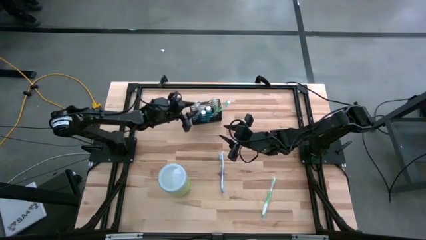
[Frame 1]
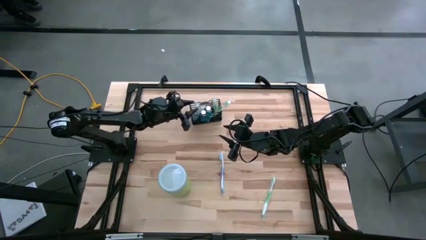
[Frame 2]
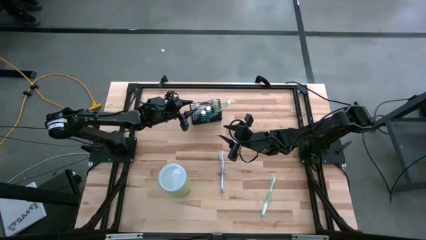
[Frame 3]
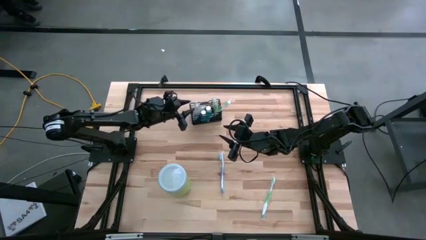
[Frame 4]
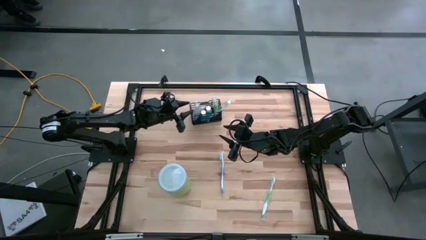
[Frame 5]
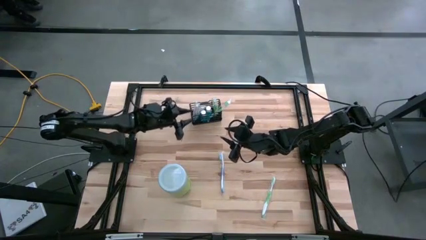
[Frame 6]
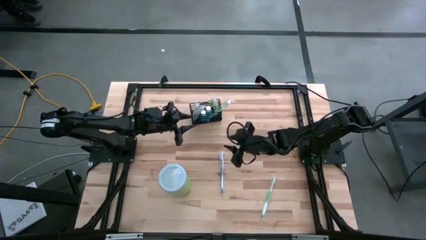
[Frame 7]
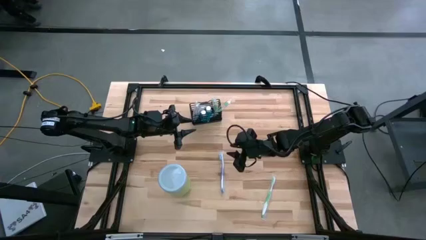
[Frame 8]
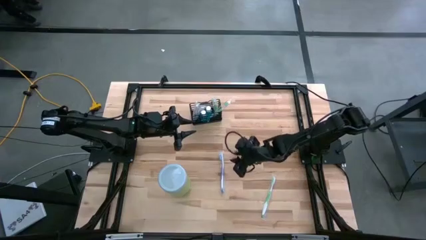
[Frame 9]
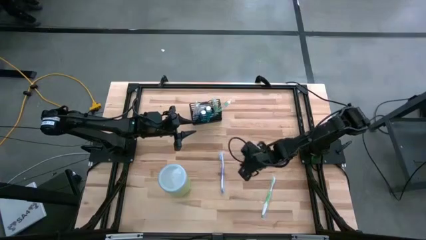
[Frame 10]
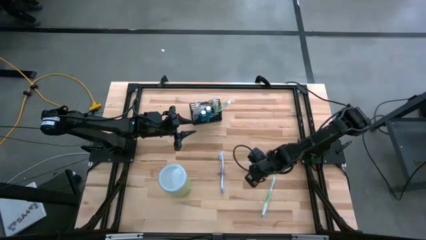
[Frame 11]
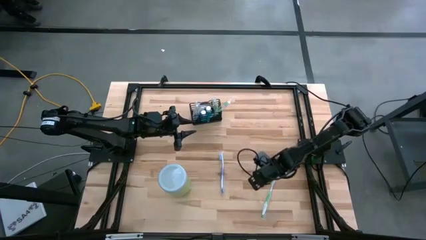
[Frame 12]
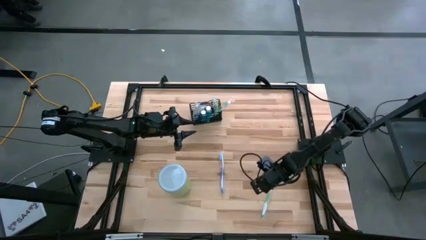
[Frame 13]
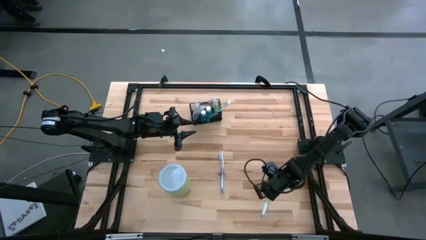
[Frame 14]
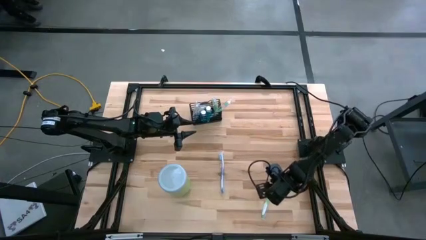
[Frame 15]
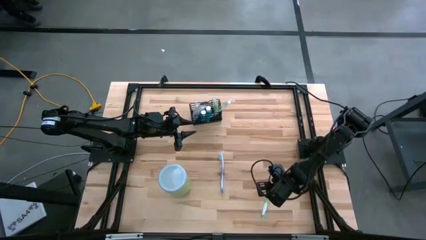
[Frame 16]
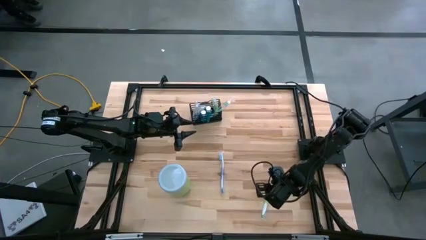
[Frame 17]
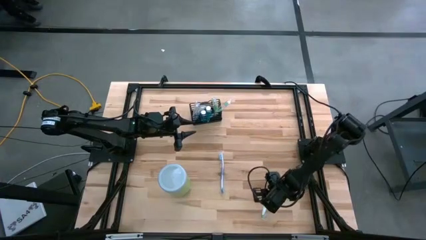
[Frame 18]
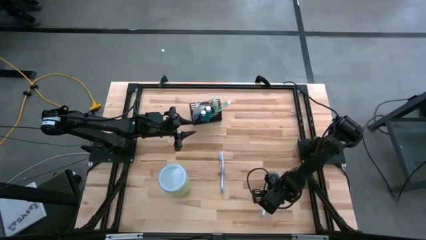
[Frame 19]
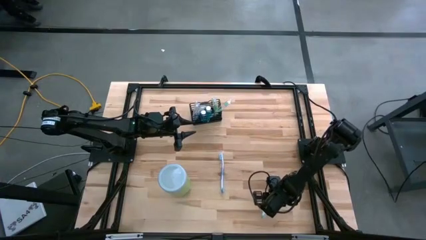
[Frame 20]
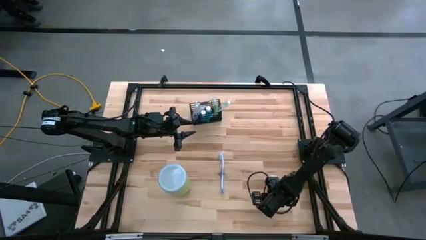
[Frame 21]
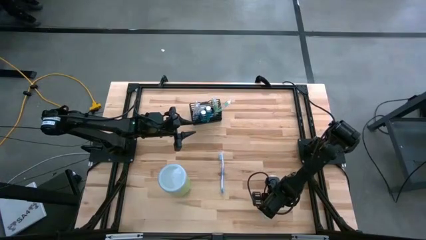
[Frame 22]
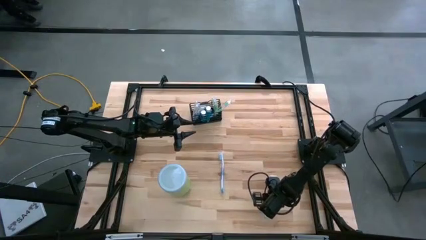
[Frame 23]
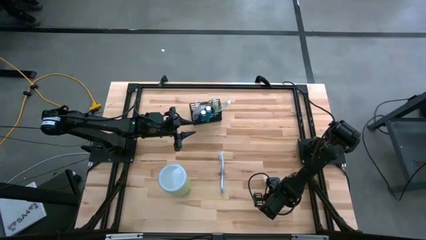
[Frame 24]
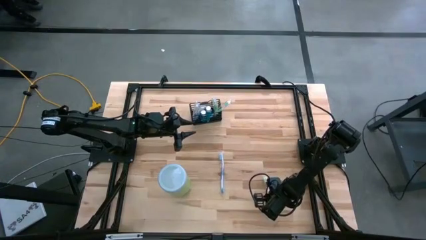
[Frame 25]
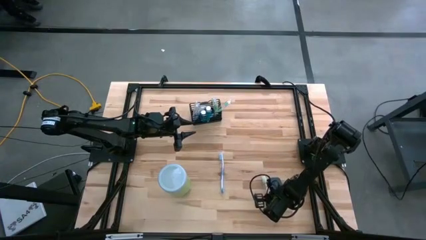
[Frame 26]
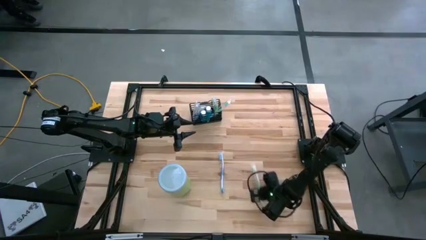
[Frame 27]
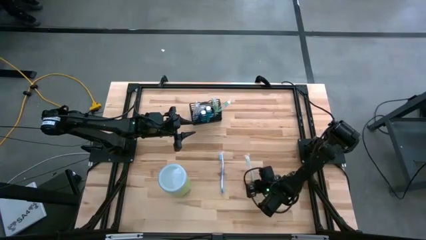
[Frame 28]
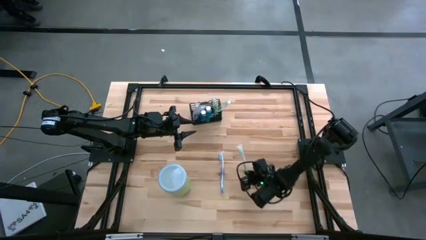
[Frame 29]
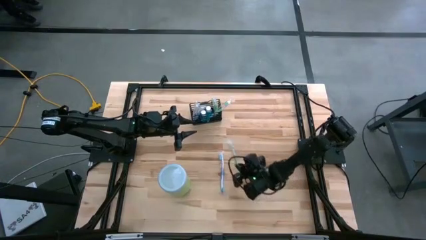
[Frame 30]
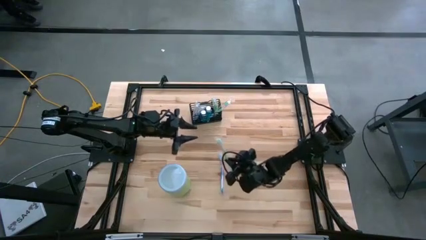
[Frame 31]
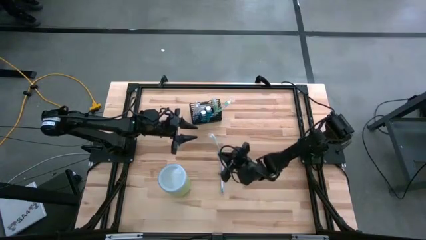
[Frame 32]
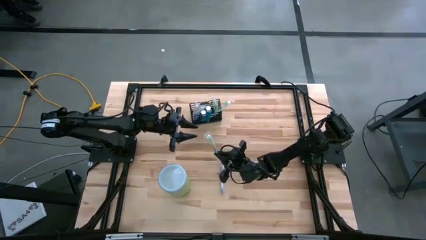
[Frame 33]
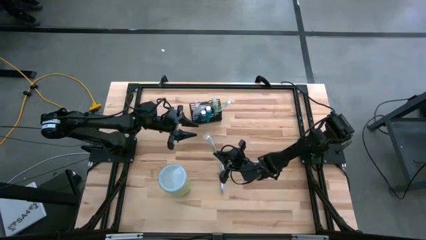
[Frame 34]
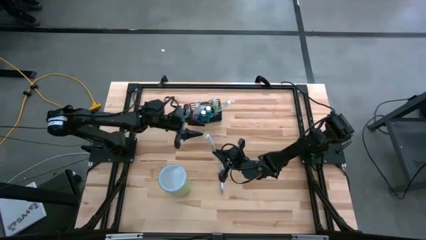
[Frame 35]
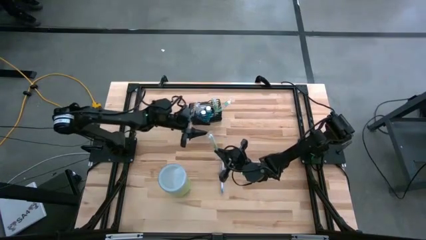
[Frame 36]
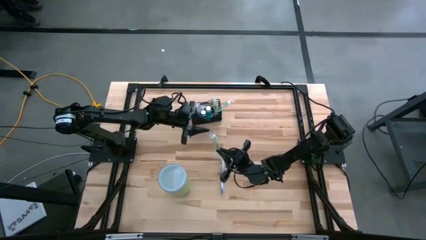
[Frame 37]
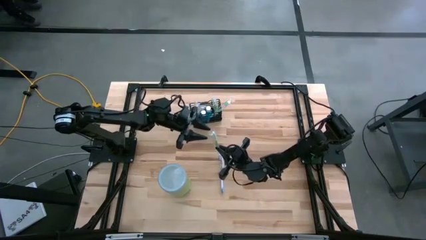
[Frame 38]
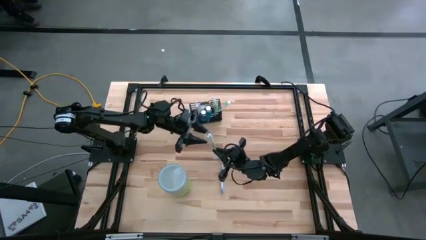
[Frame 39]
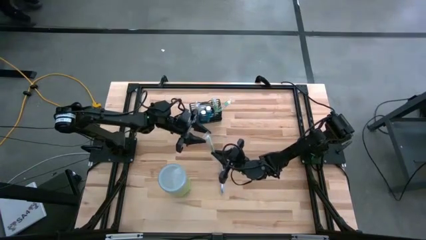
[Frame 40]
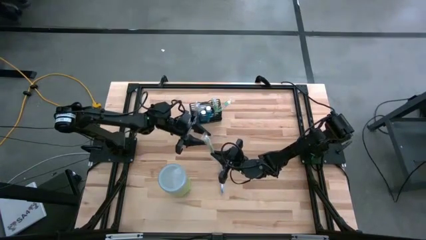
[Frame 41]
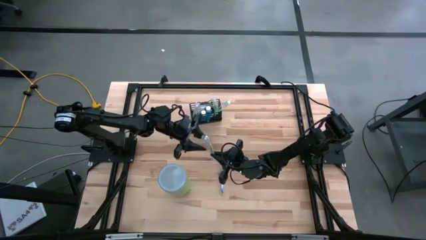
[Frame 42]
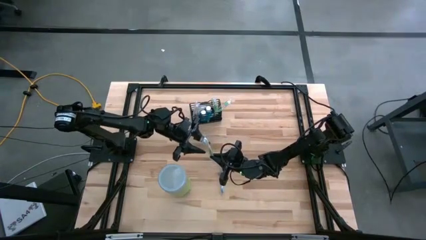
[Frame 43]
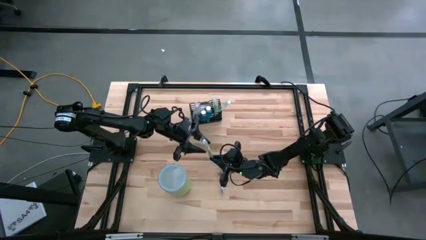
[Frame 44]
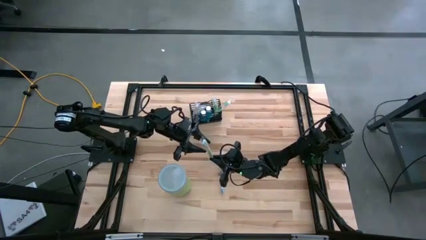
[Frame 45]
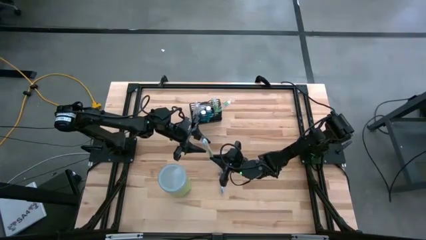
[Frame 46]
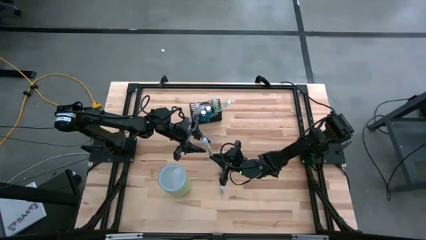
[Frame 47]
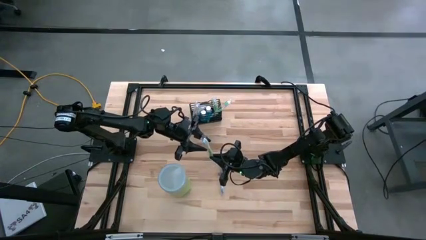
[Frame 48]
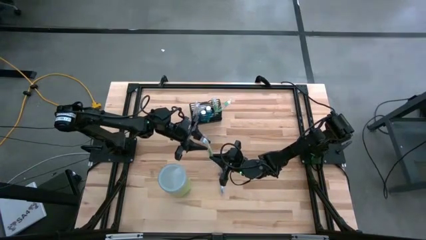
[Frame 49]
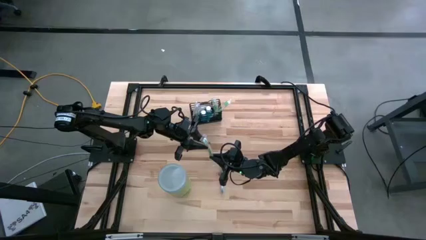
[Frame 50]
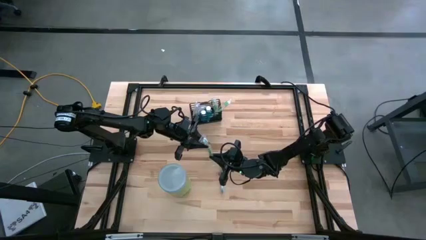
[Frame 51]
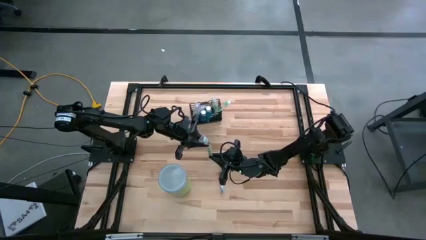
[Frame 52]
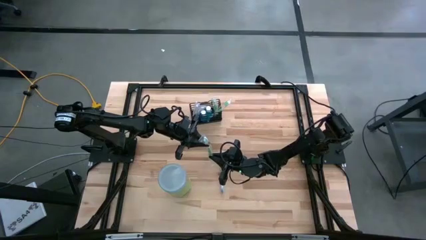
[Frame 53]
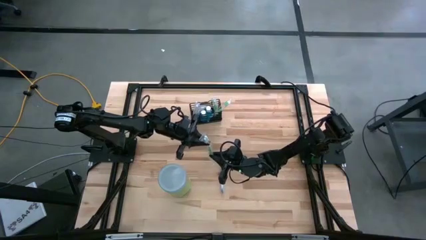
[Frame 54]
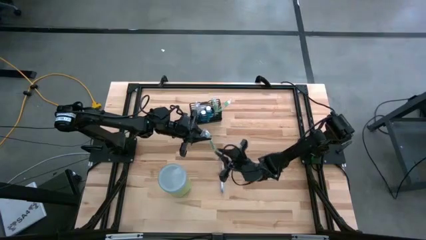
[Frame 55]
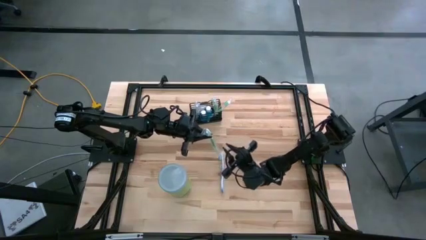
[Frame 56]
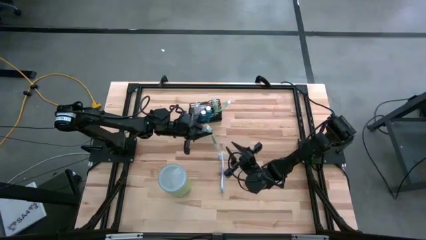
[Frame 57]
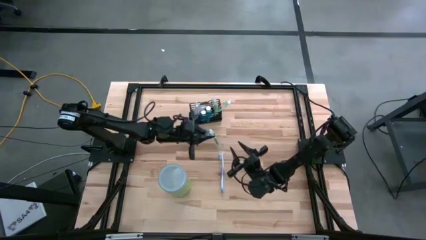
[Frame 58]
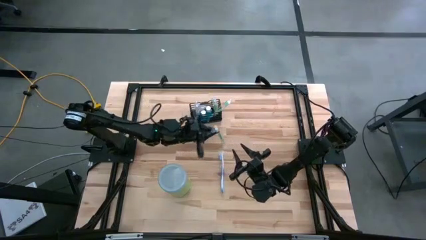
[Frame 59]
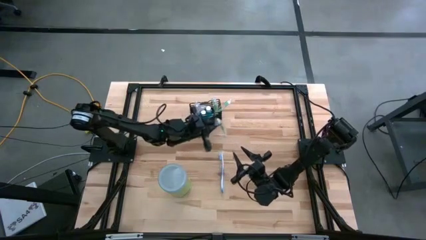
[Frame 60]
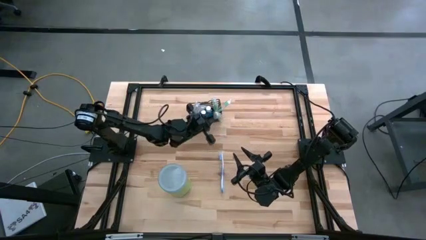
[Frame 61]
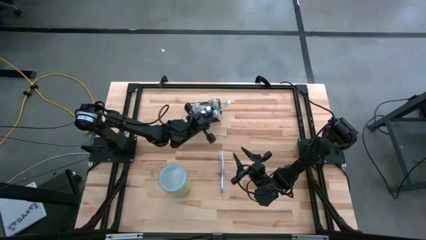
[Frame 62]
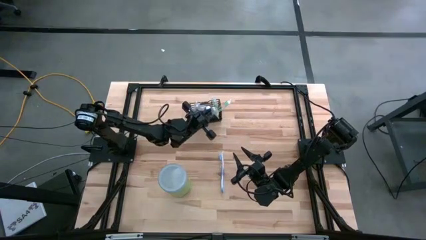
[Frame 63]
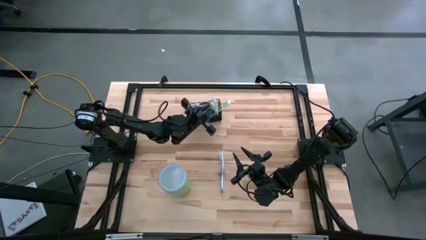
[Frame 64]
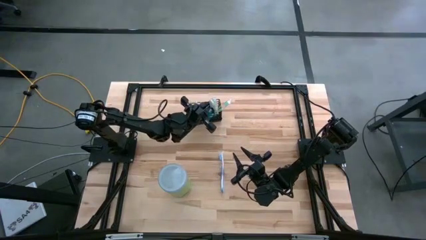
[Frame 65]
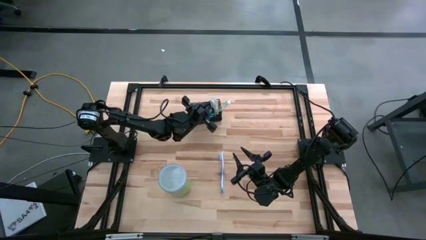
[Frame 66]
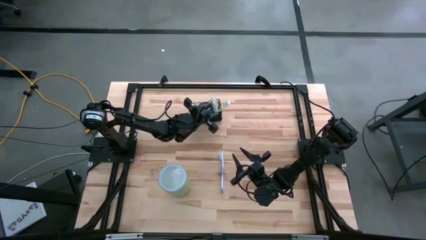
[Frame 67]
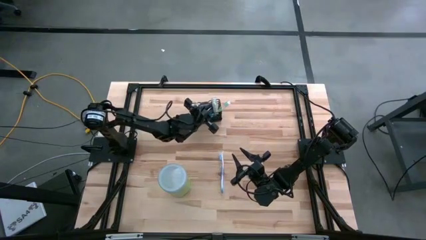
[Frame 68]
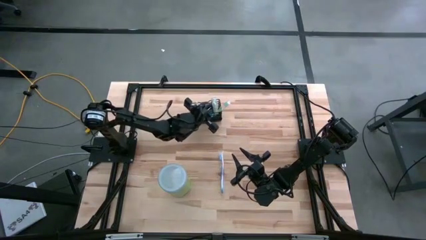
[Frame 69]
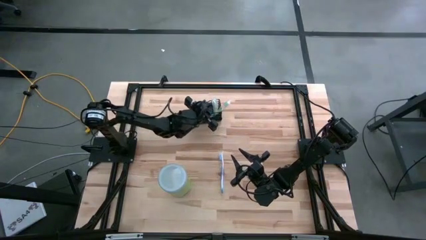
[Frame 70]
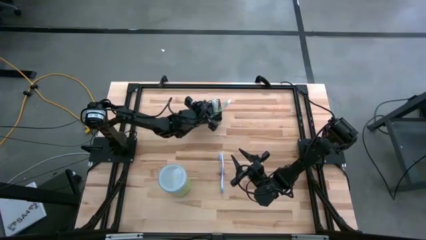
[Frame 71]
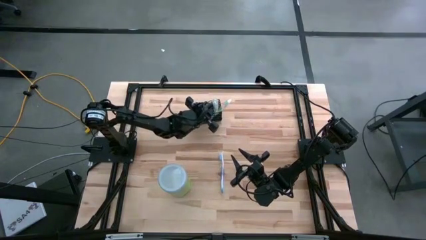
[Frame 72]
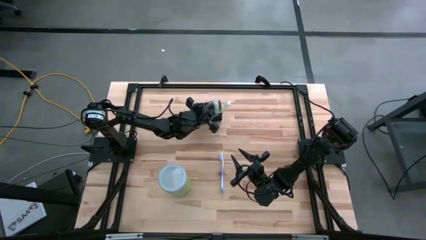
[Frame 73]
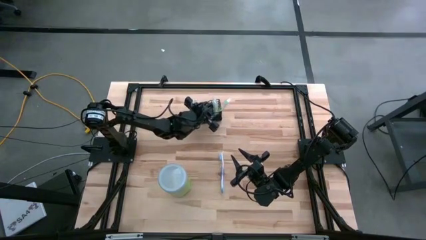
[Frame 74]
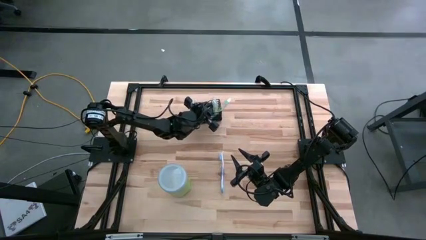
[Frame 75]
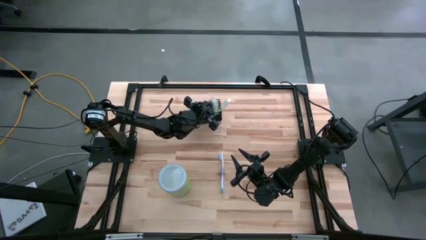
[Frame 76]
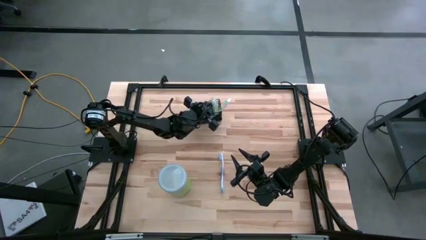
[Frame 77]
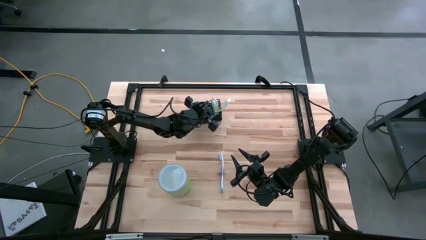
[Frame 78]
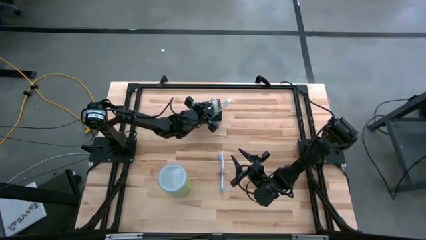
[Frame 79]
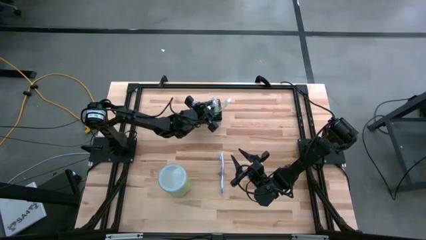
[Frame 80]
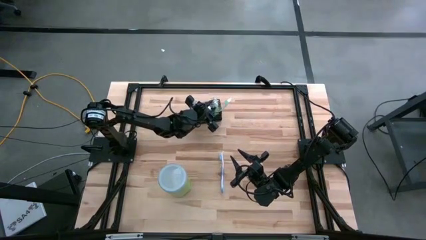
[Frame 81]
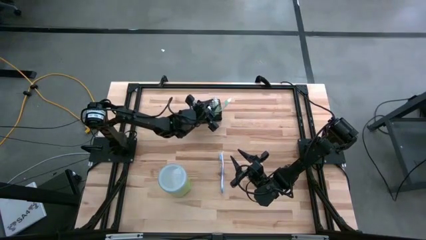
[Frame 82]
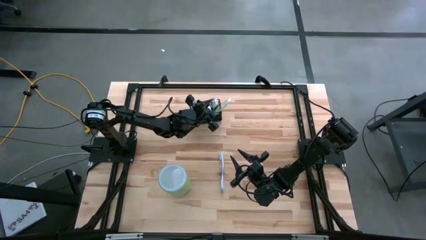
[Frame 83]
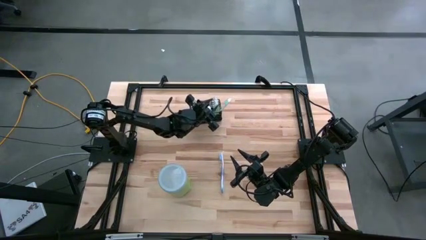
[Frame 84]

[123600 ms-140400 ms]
Task: Pick & Place toothbrushing station
Put the green toothbrush into the black bin mesh mesh organizer
